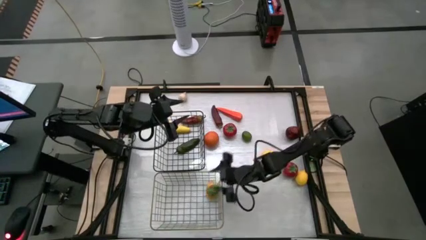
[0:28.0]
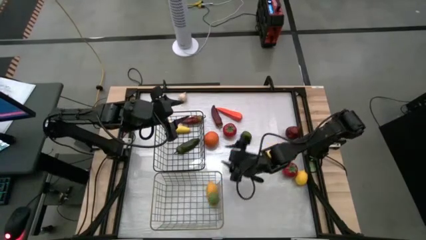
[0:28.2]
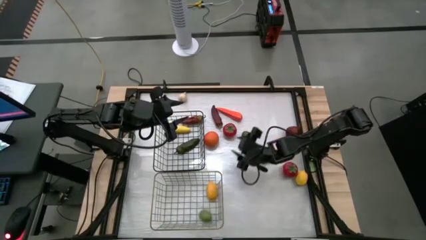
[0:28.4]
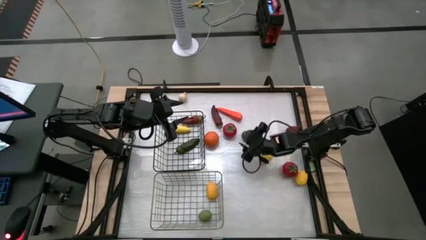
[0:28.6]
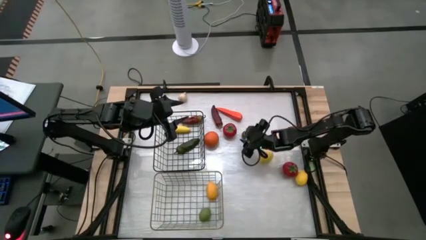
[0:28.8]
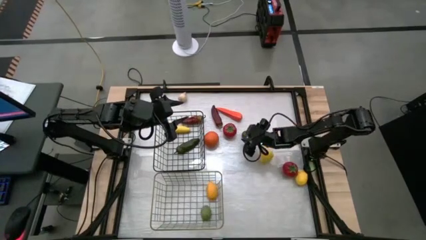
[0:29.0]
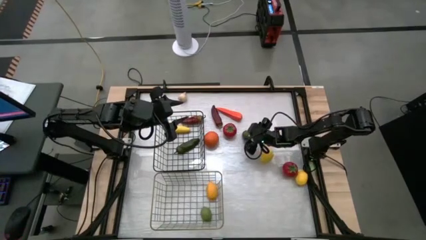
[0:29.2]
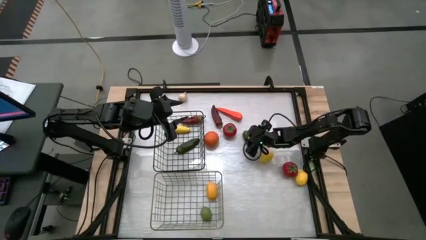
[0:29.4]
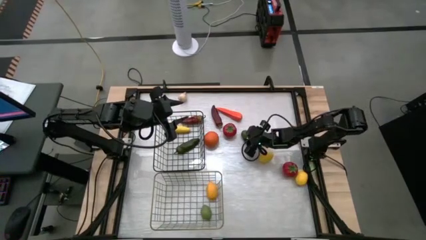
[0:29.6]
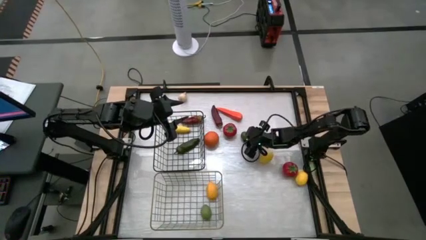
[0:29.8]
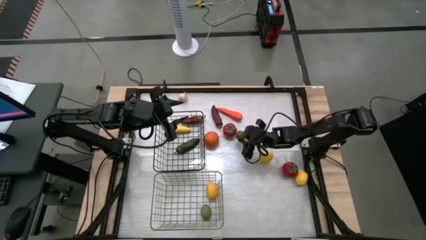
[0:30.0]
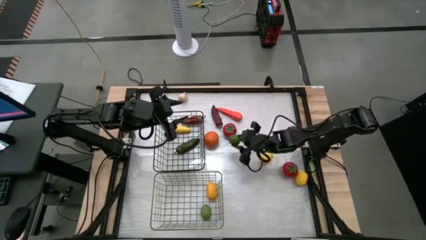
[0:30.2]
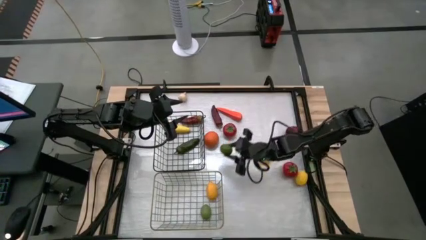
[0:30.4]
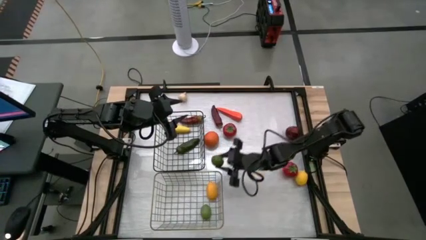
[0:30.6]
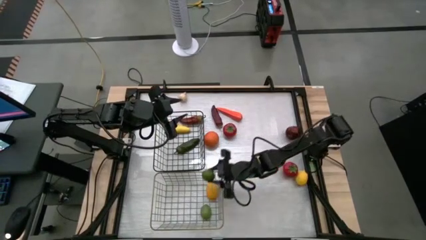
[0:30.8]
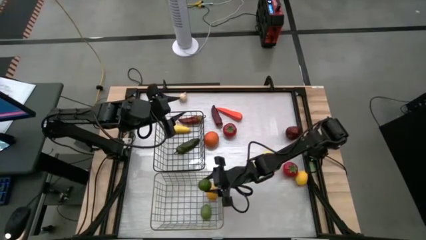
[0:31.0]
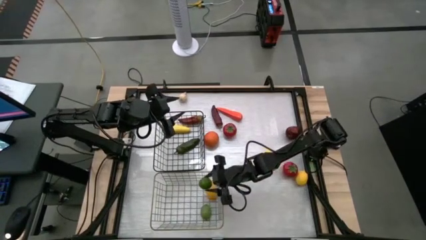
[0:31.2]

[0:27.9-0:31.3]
Task: Sort produce into baskets
Put the green lemon into the gold wire basket

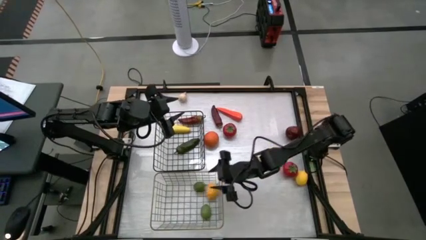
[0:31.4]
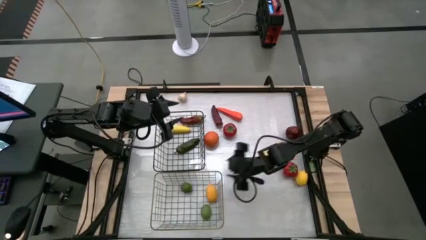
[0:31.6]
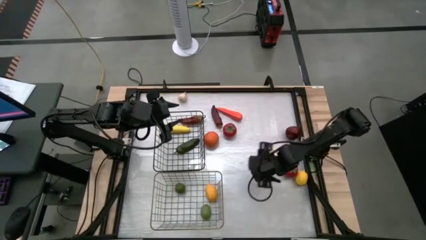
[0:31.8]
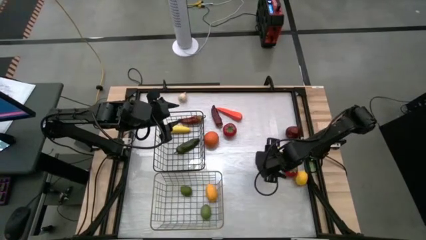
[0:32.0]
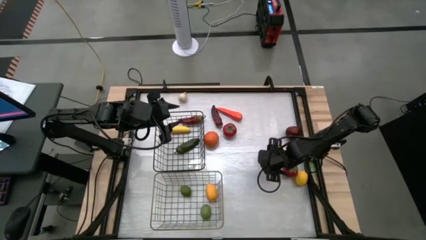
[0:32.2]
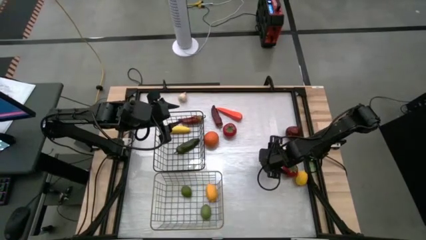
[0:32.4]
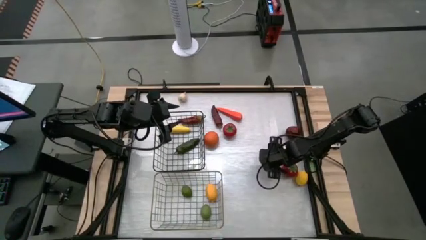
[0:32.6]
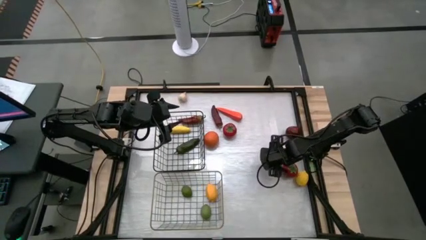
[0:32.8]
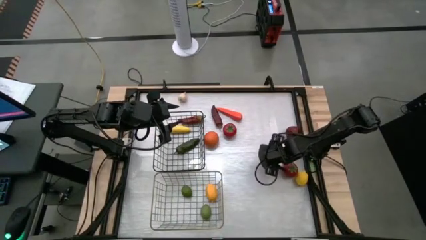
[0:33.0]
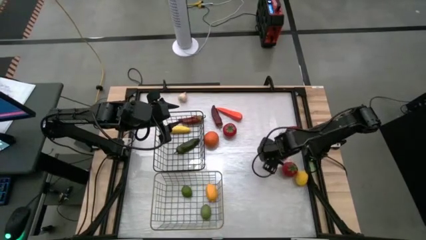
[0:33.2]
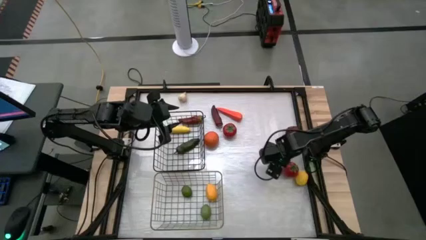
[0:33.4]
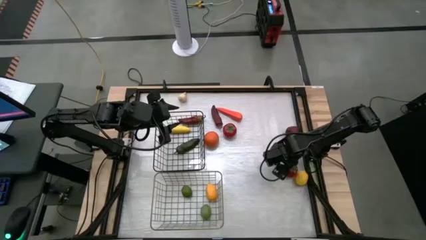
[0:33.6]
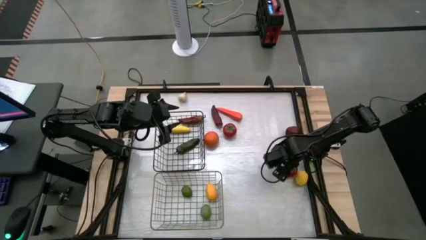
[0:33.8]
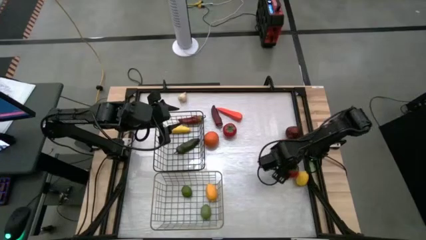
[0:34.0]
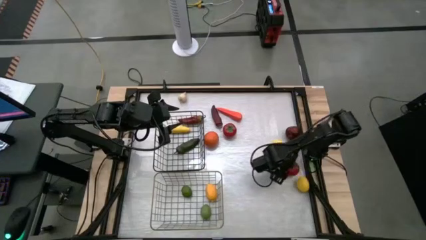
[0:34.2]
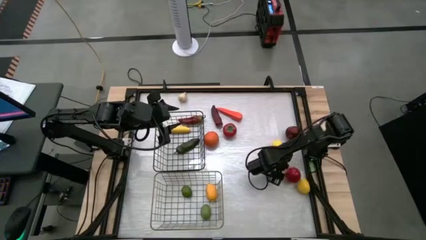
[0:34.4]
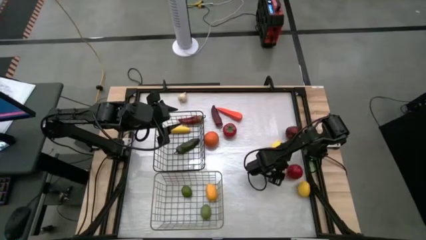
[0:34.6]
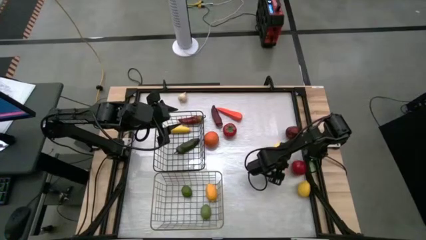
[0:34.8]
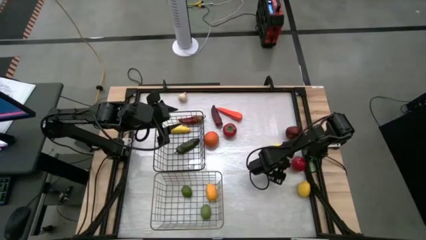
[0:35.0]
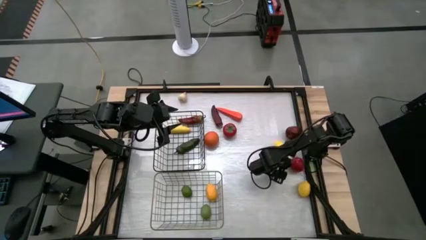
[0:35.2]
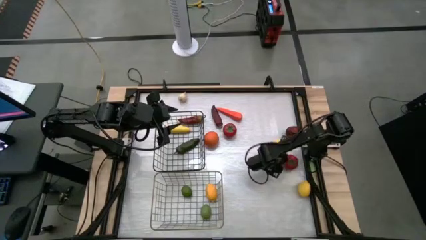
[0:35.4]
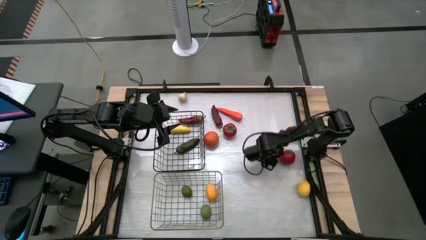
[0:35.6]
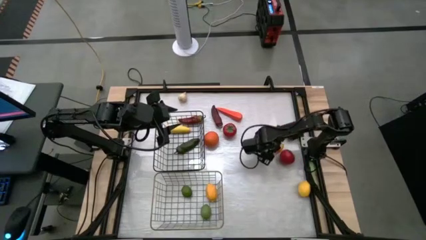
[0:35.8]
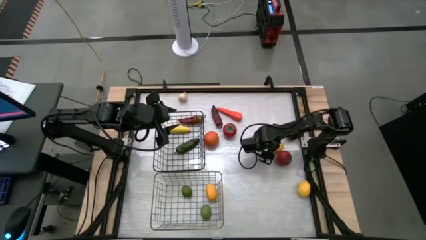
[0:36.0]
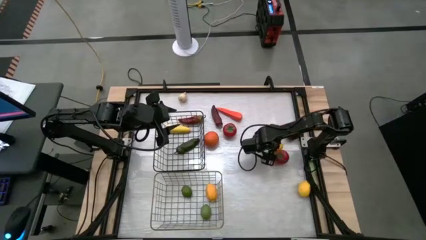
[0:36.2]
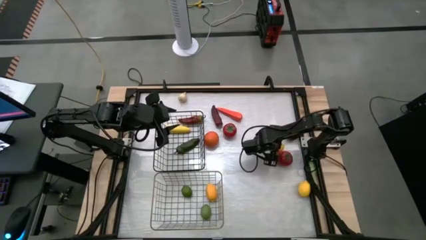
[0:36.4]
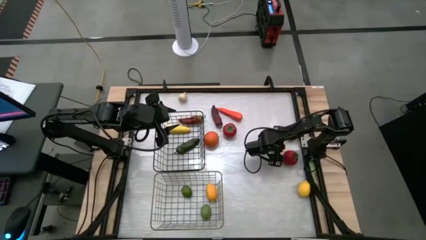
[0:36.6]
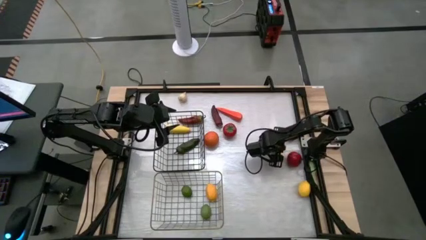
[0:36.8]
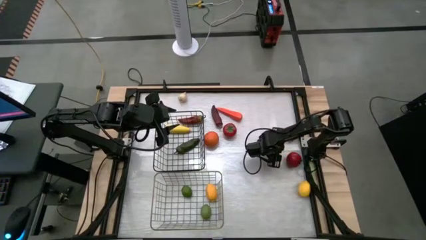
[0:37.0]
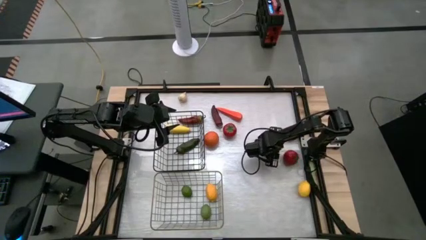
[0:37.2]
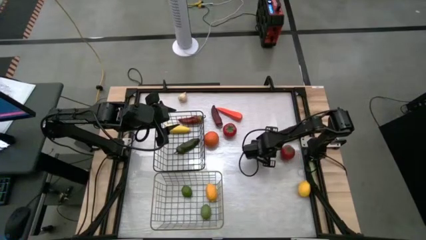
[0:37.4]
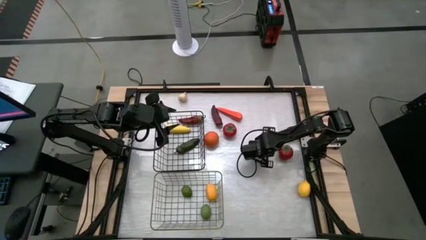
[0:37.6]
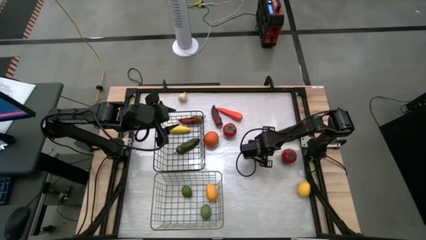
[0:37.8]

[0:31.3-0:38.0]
Put the top yellow lemon into the gold wire basket

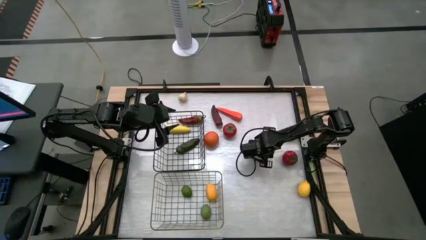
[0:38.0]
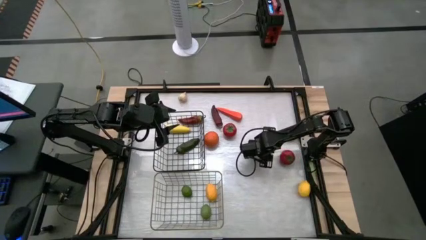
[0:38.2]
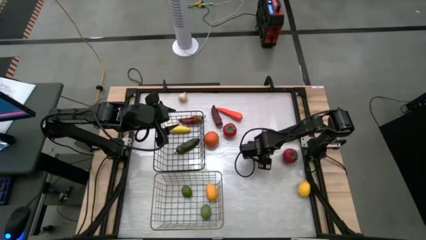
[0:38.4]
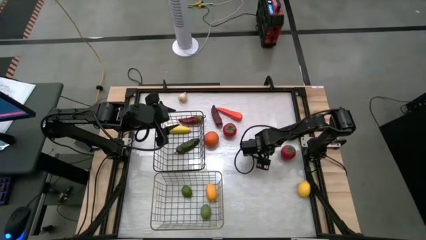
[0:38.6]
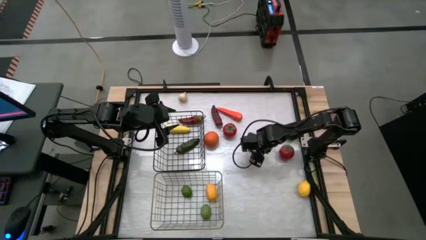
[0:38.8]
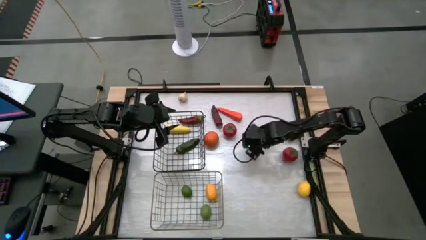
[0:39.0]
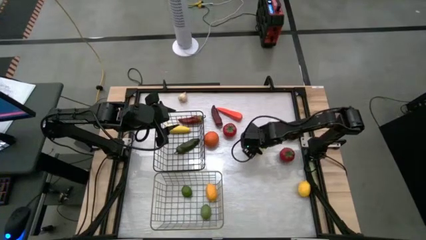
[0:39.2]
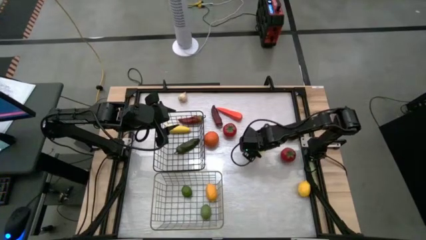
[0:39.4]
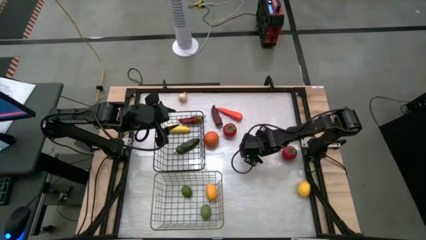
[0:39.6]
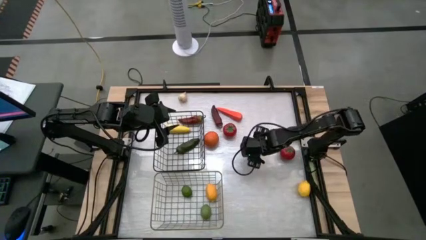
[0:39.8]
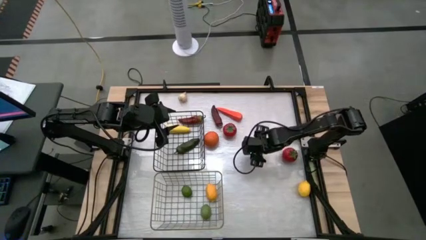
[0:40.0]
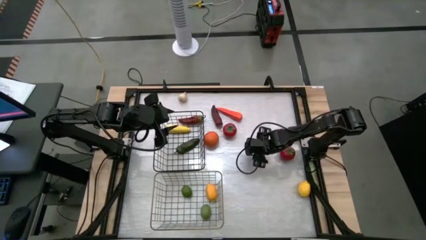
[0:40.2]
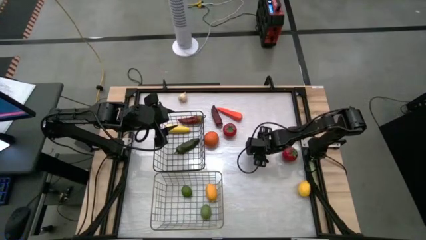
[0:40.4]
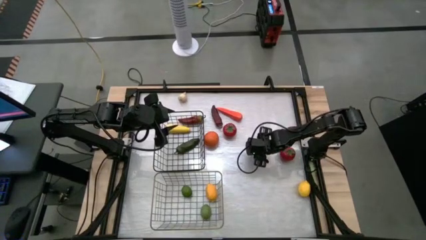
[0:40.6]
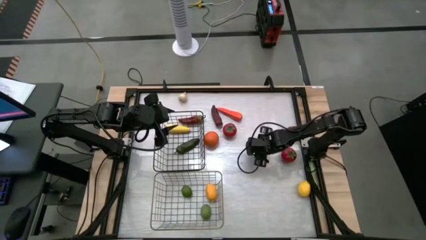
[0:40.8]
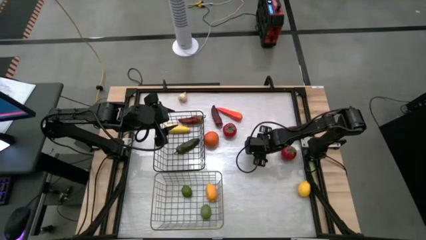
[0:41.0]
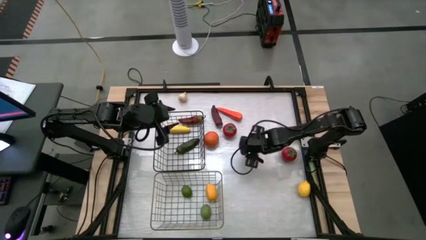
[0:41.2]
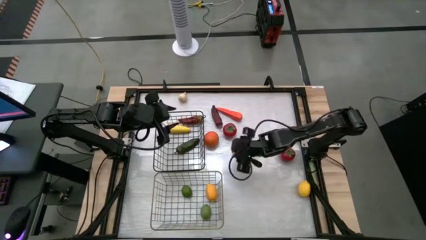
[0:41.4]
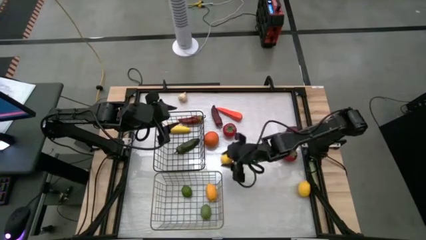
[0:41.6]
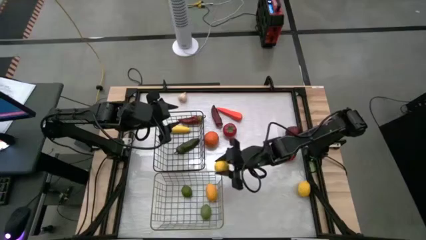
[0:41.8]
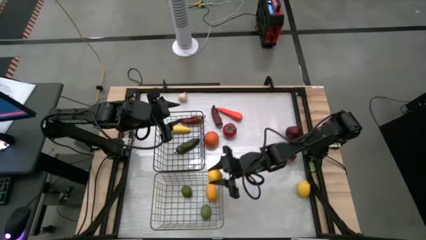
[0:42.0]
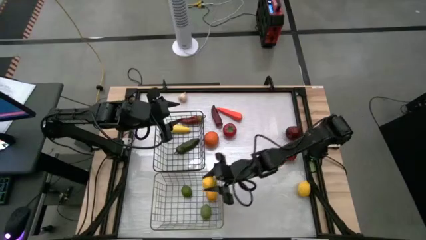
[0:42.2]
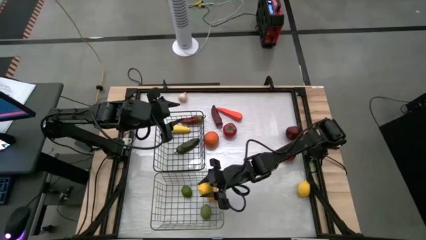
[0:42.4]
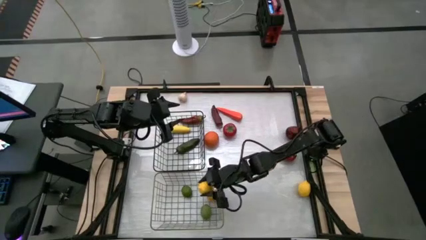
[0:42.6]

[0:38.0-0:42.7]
Put the top yellow lemon into the gold wire basket

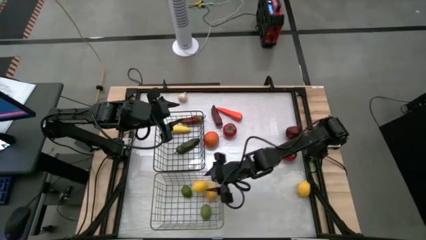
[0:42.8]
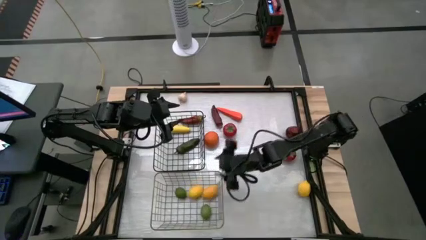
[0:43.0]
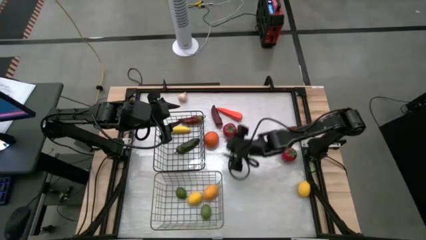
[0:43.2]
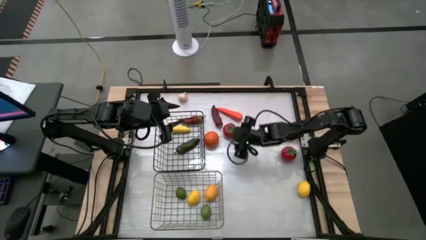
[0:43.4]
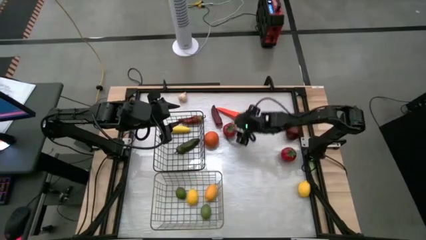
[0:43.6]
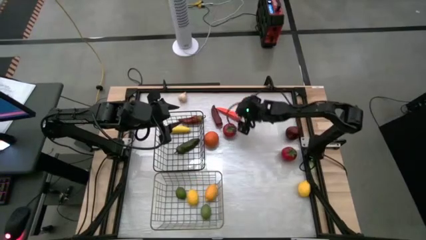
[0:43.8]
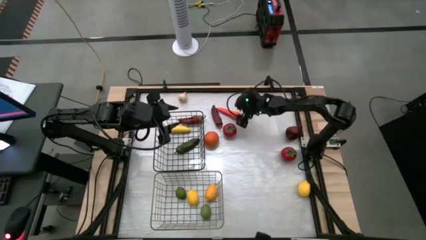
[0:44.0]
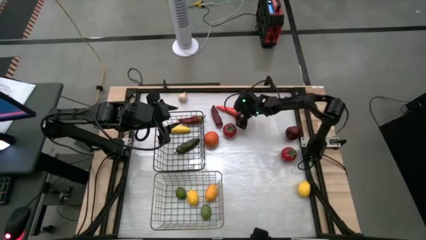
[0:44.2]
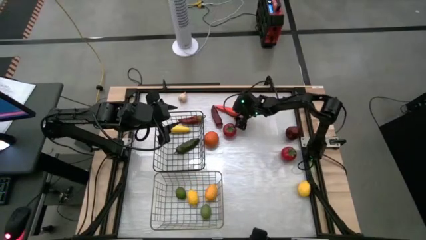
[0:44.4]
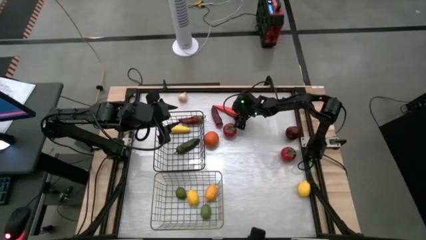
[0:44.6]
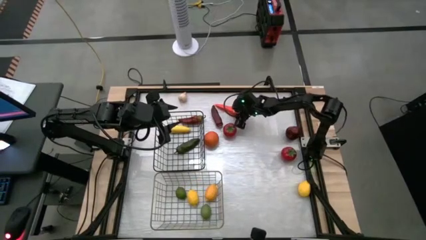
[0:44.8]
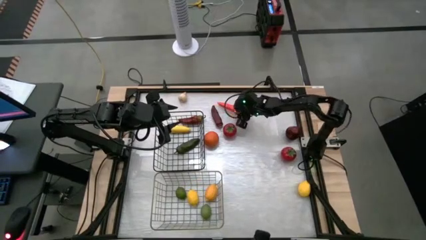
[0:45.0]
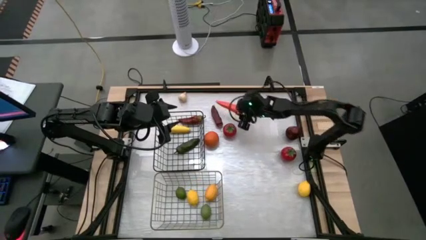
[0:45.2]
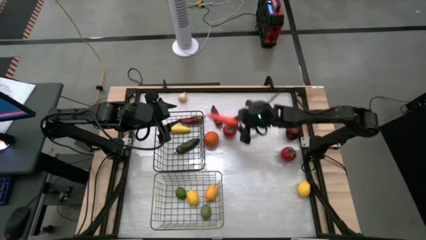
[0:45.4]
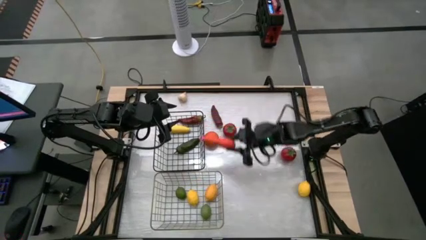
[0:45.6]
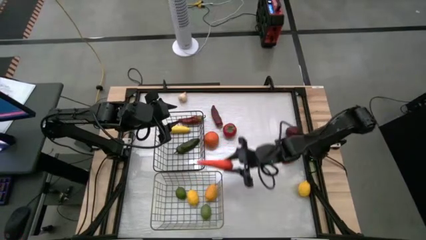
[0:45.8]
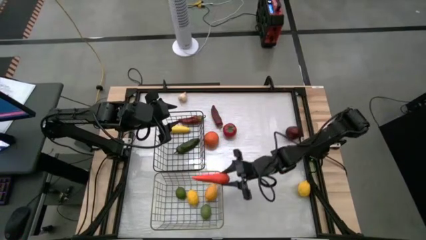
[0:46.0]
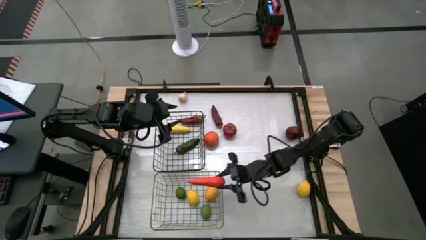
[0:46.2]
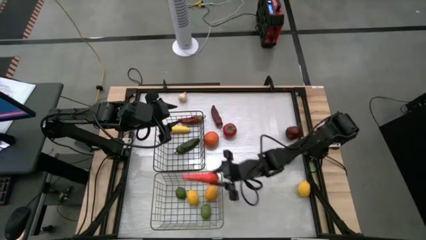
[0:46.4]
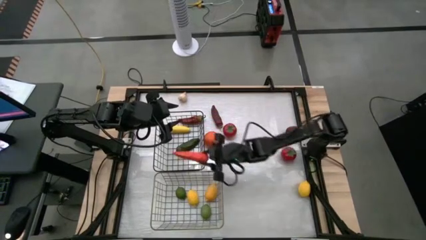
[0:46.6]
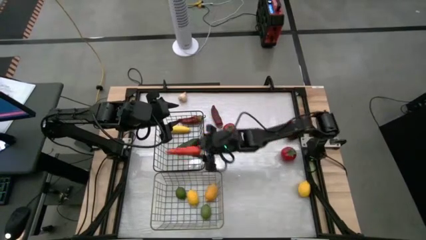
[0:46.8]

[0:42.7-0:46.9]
Put the orange carrot into the black wire basket
